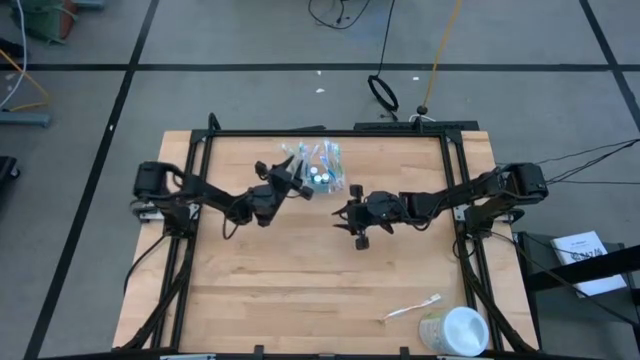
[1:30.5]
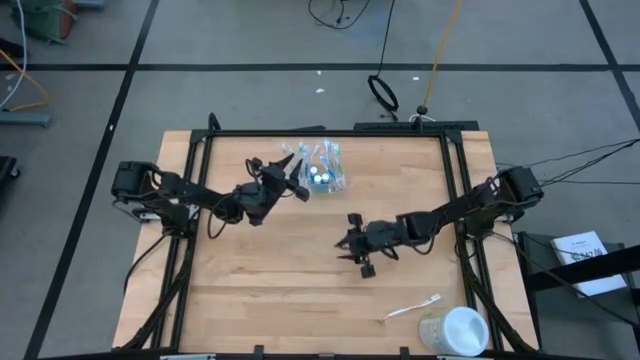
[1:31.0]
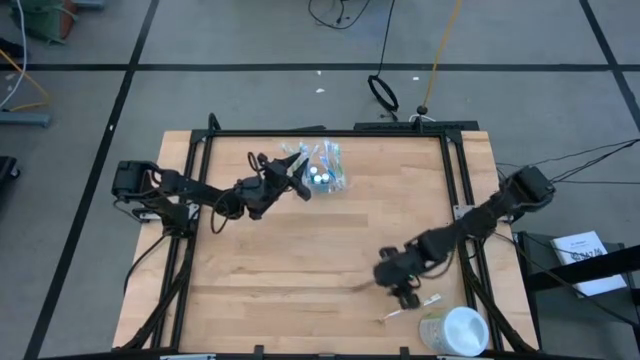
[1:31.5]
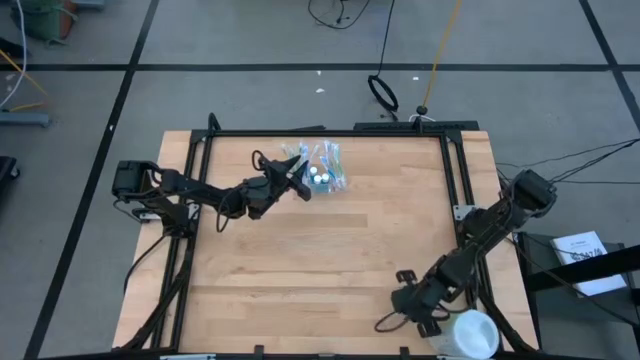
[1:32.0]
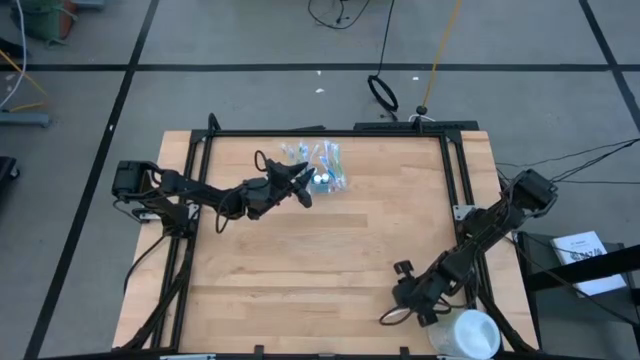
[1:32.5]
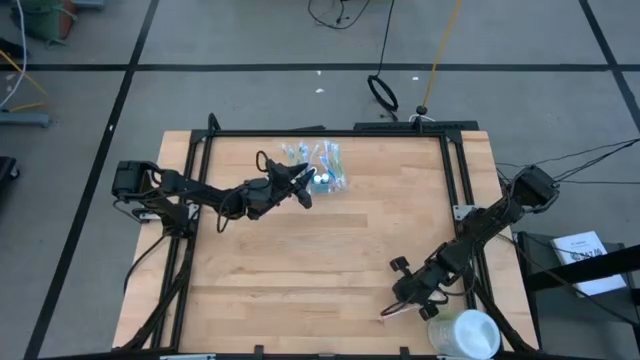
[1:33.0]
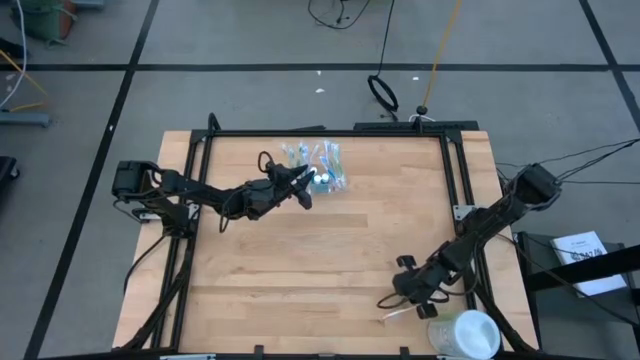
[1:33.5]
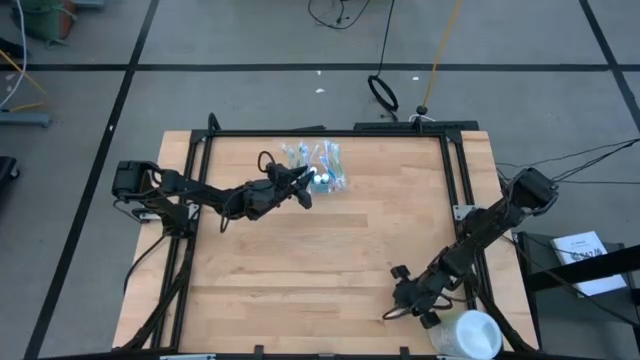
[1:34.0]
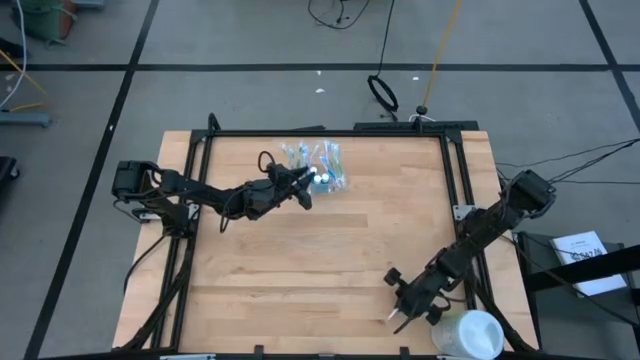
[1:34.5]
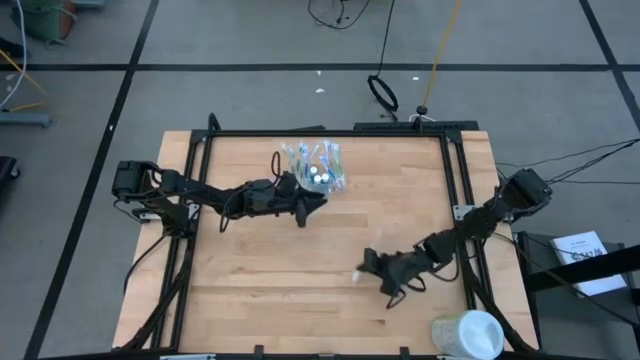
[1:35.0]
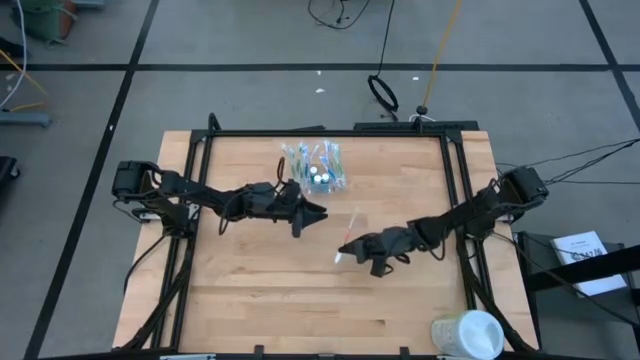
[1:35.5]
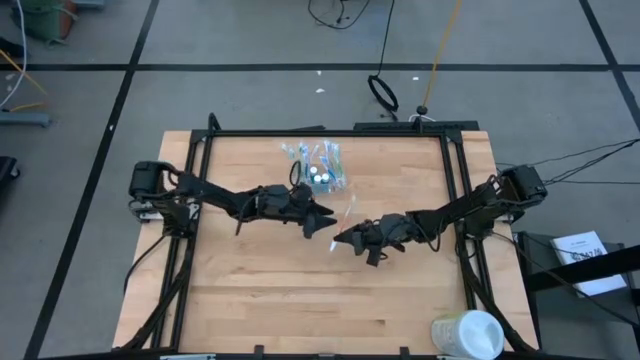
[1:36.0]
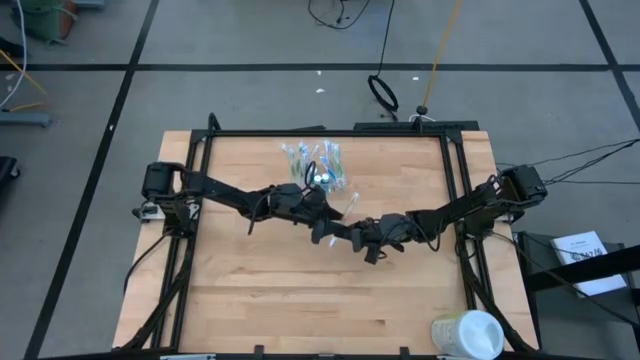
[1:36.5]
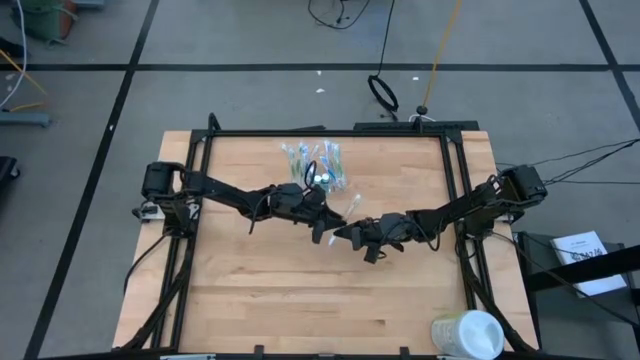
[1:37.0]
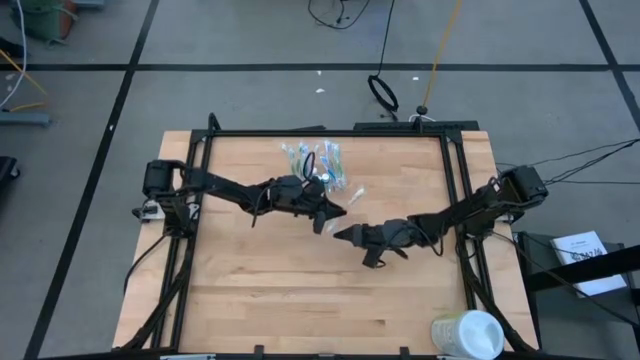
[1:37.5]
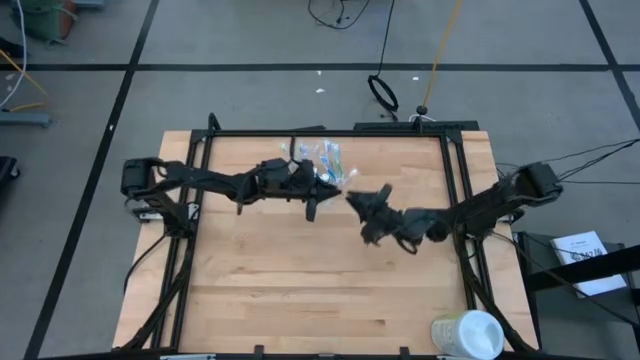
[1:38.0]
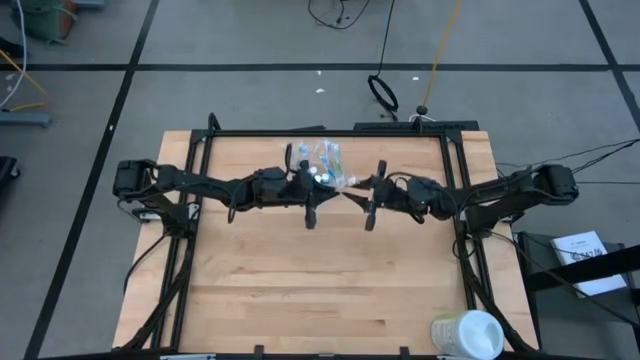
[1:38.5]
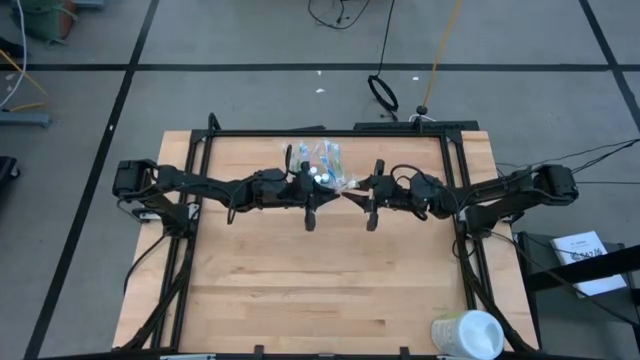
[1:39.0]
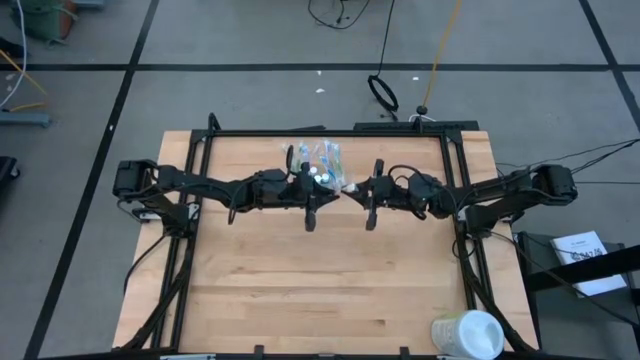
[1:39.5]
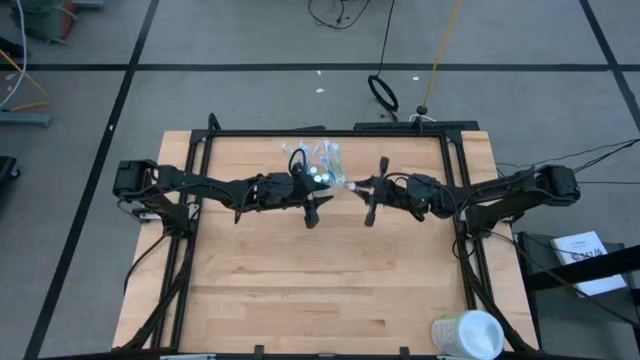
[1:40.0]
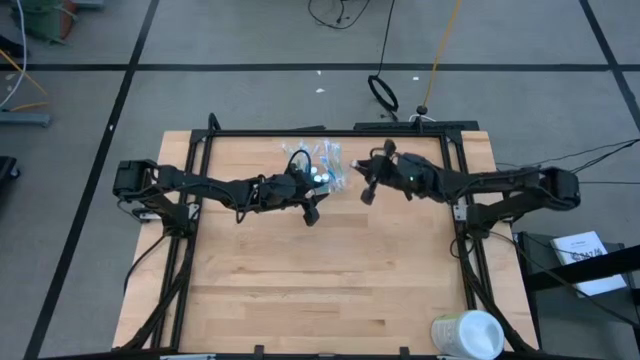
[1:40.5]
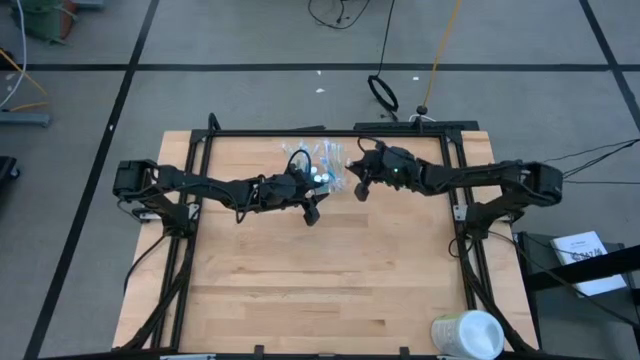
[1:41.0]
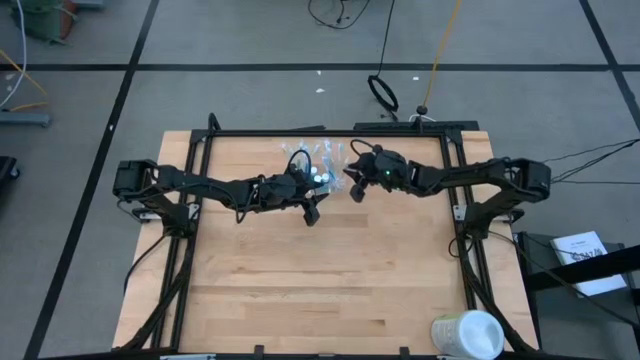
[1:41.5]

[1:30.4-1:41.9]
Task: Pick & Place toothbrushing station
Put the orange toothbrush into the transparent organizer

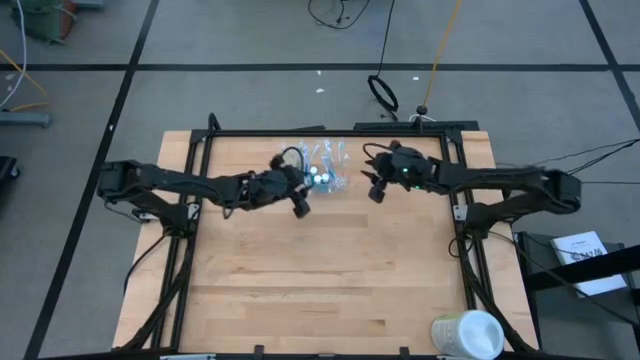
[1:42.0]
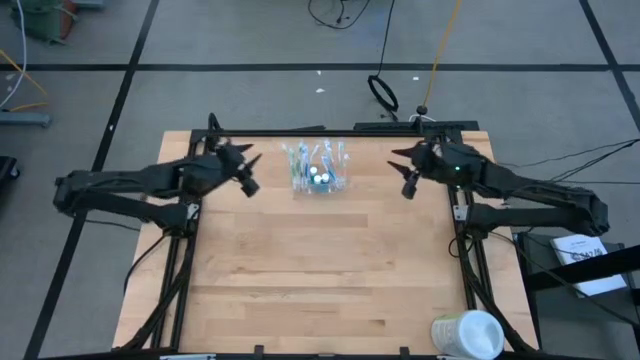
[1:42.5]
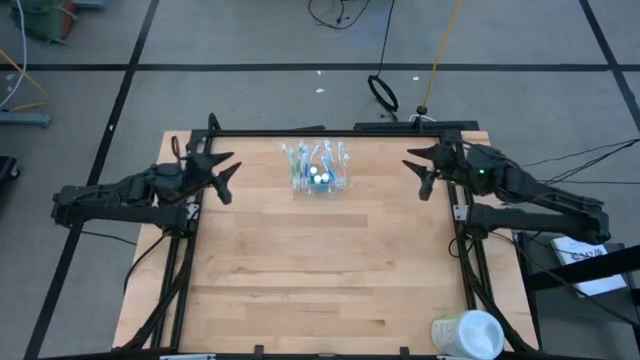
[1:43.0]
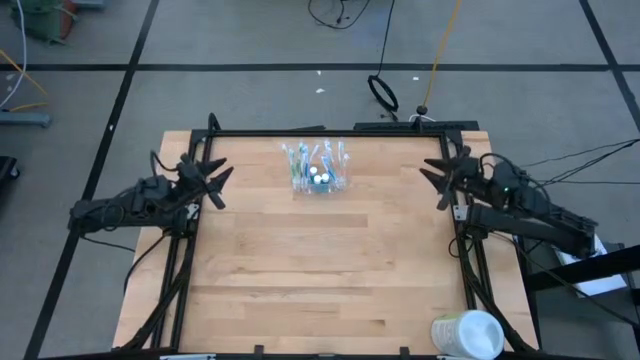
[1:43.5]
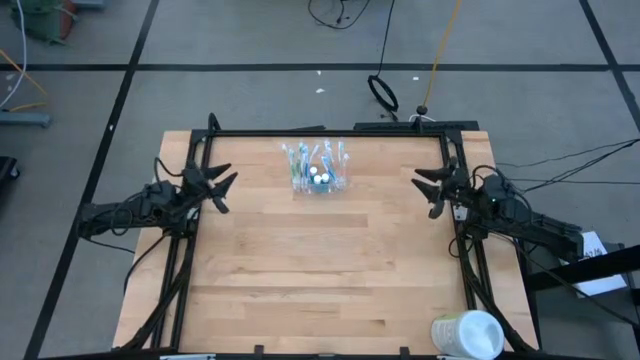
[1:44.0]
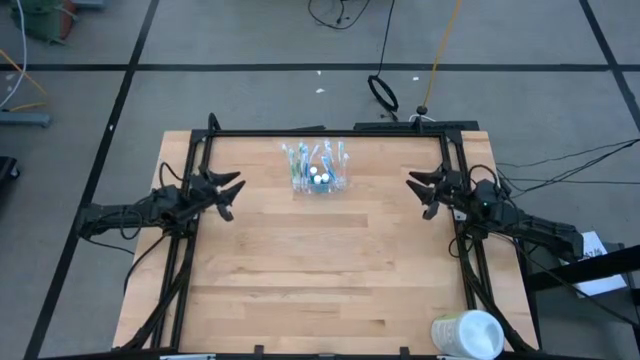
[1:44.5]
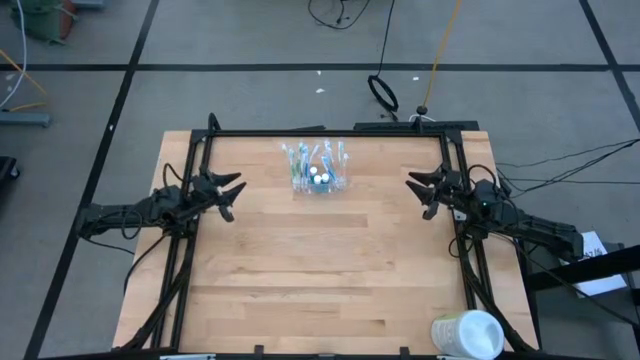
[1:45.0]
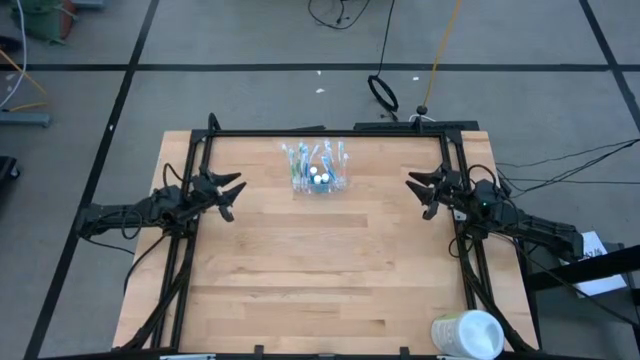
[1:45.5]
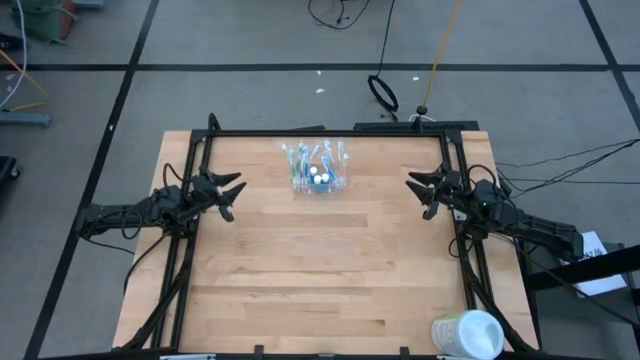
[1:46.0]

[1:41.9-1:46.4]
Return to Home Position

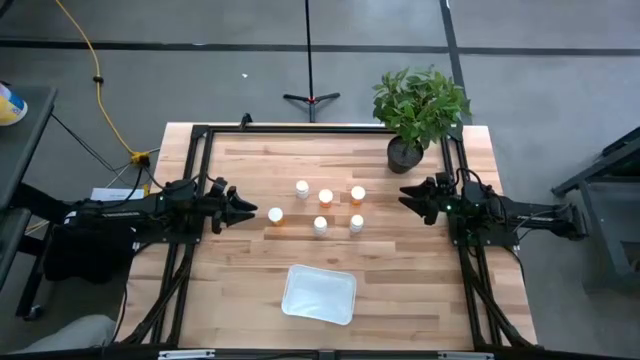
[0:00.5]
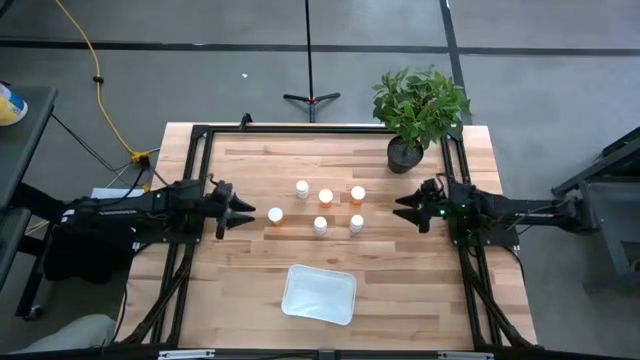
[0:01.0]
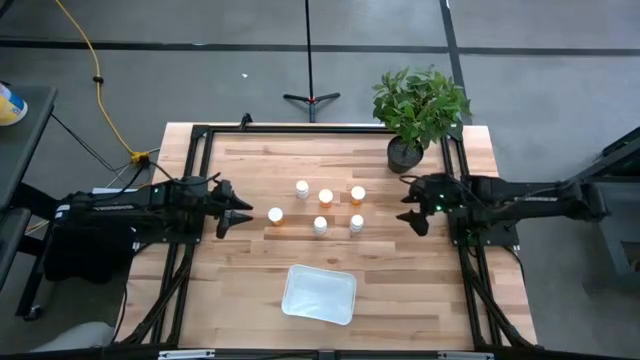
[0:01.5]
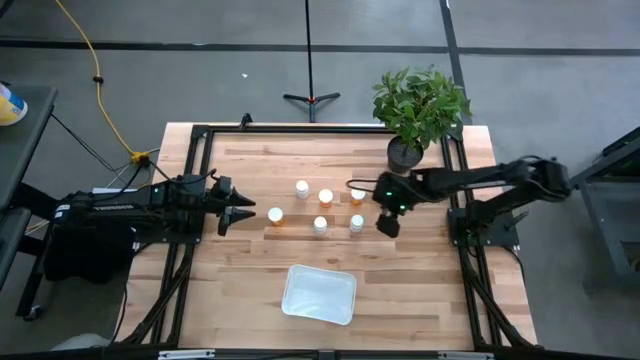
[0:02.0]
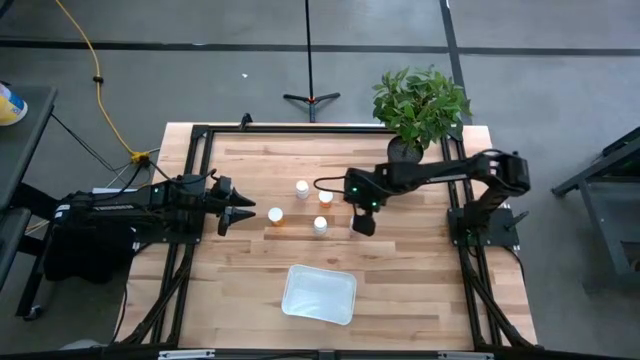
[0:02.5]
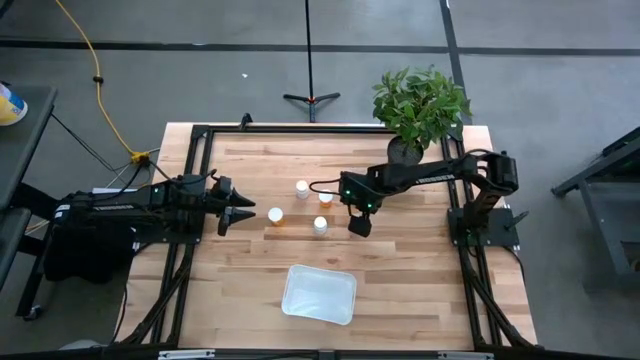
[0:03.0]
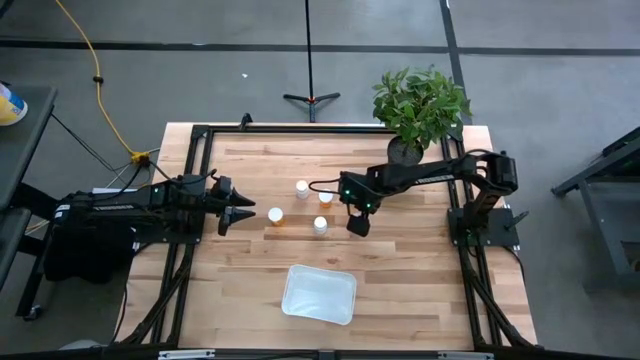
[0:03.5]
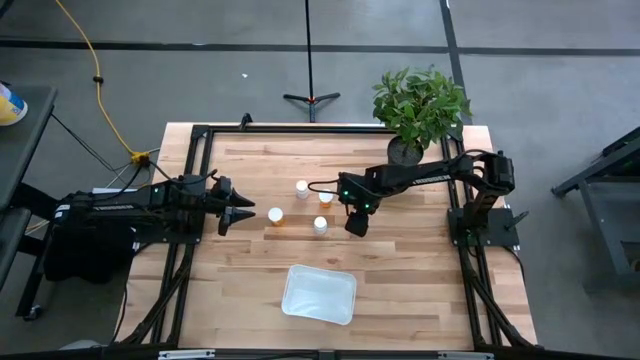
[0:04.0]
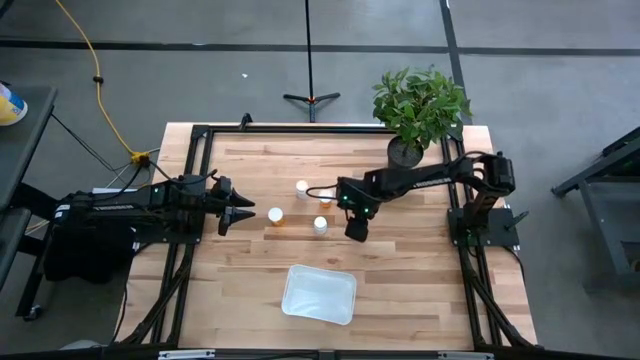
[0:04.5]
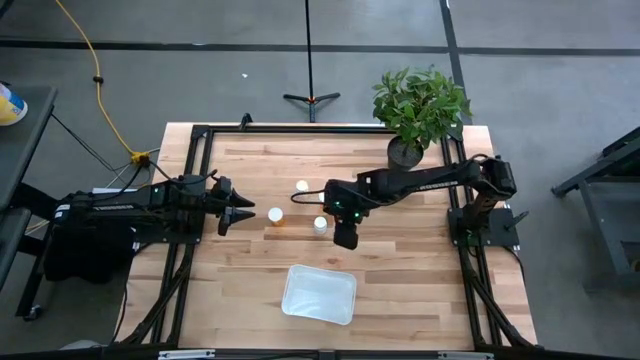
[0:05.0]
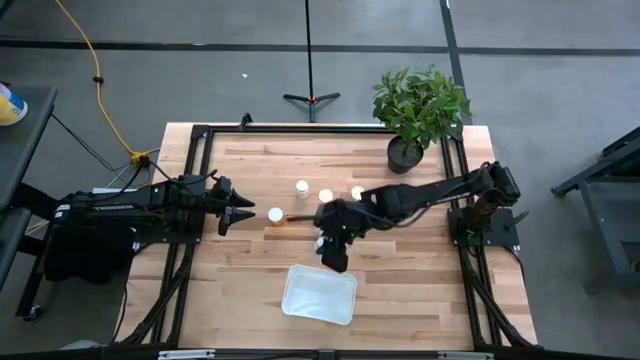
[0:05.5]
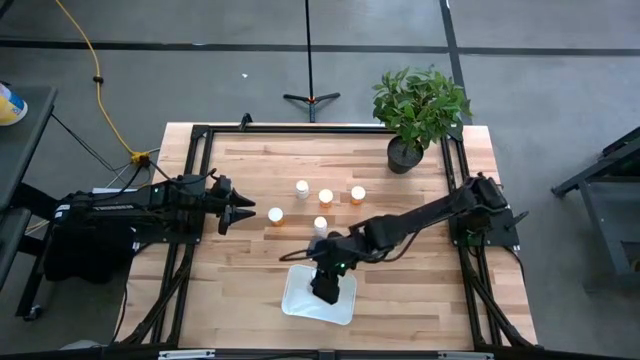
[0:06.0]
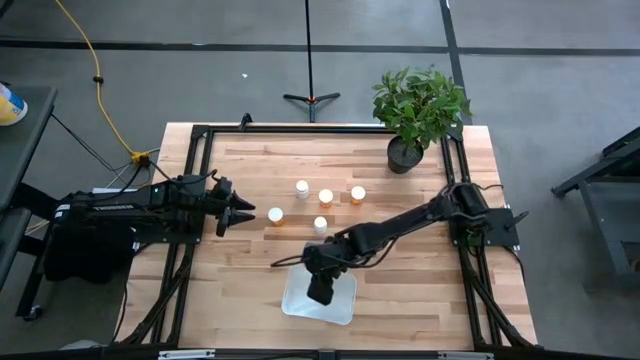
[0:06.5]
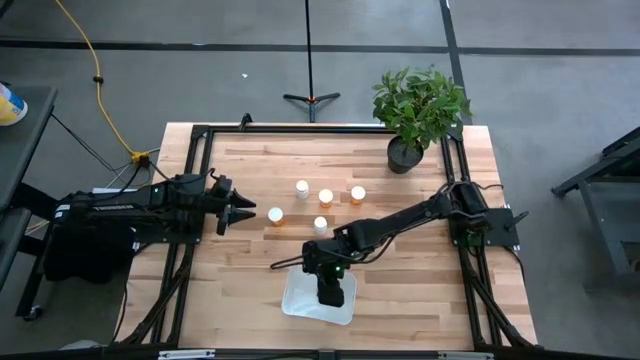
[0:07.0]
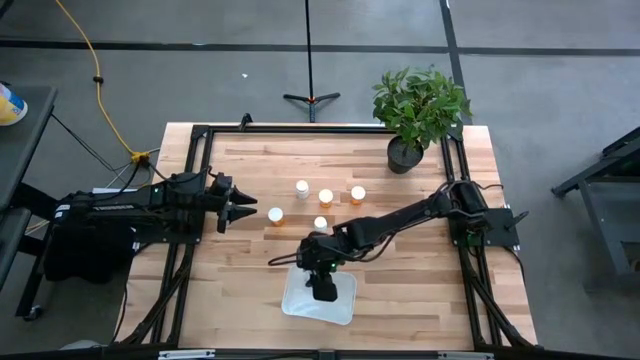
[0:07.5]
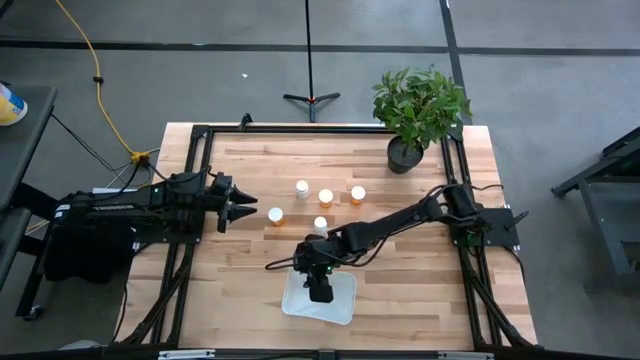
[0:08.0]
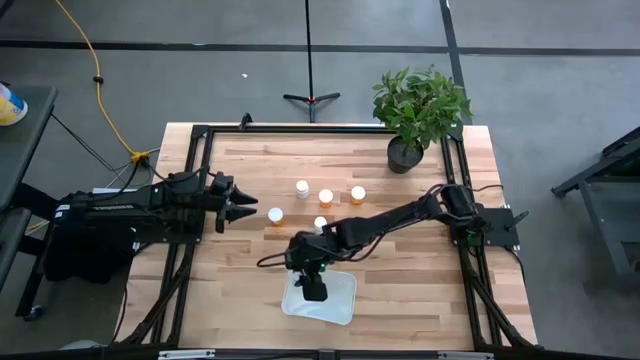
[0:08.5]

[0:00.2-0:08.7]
Task: Pick and place pill bottles into a basket
Put the bottom right white pill bottle into the white bin
